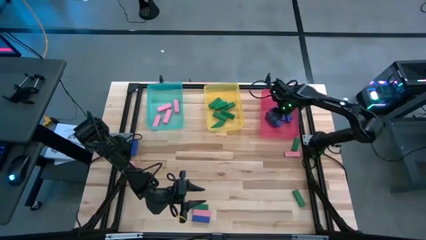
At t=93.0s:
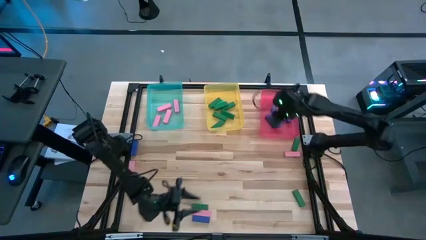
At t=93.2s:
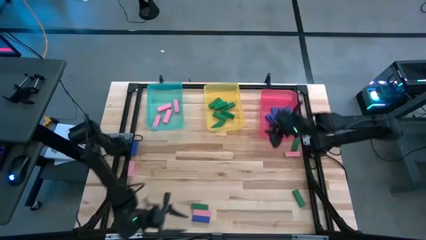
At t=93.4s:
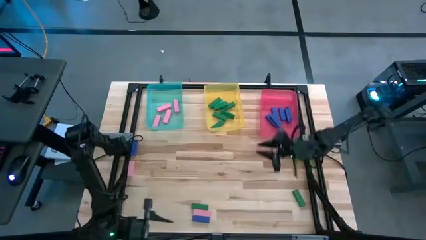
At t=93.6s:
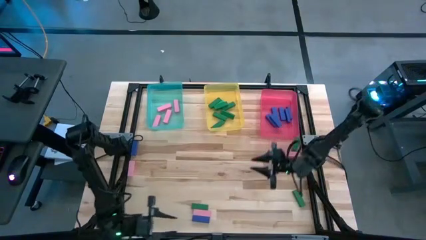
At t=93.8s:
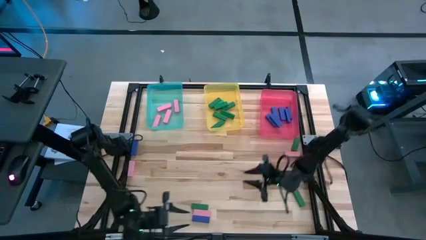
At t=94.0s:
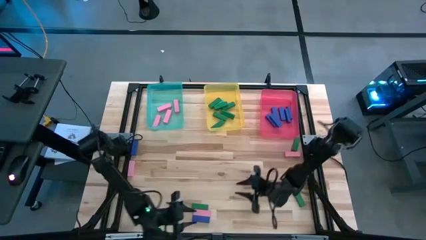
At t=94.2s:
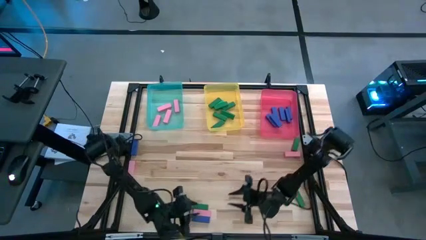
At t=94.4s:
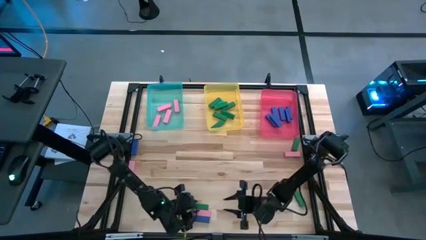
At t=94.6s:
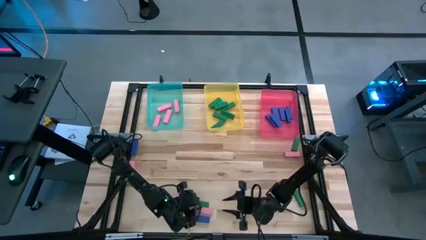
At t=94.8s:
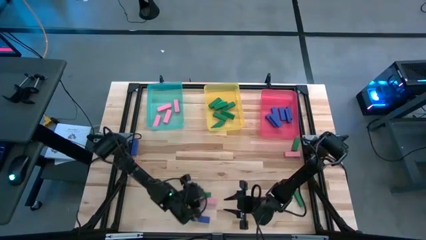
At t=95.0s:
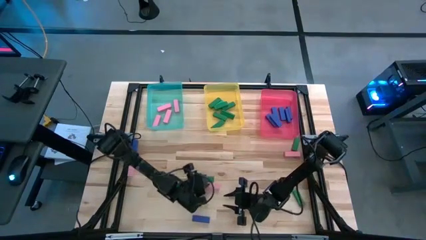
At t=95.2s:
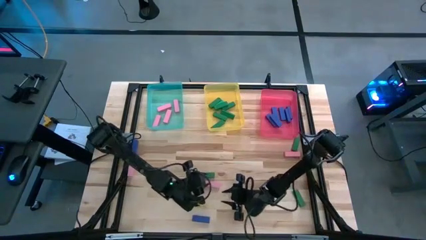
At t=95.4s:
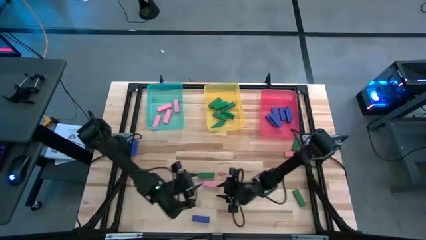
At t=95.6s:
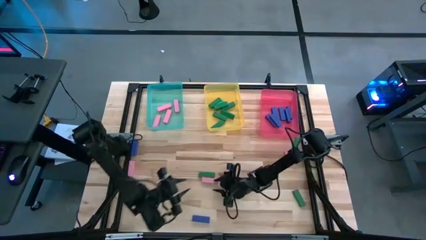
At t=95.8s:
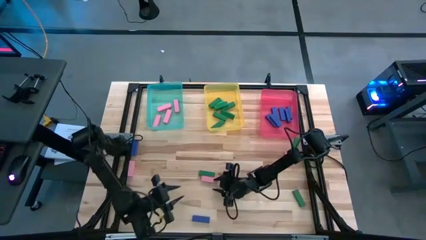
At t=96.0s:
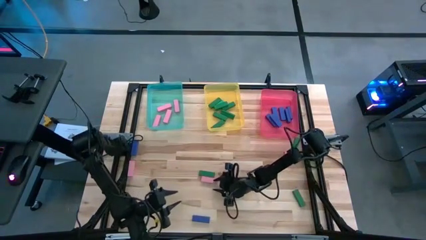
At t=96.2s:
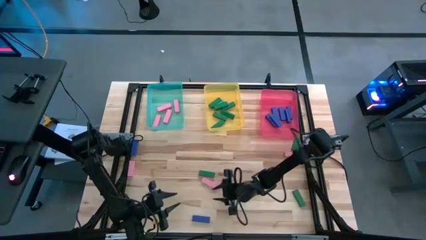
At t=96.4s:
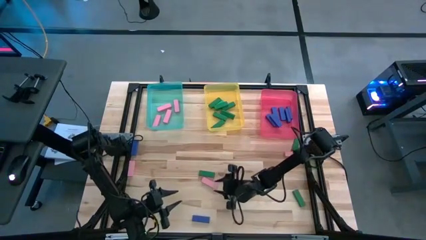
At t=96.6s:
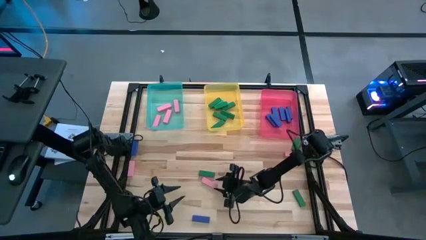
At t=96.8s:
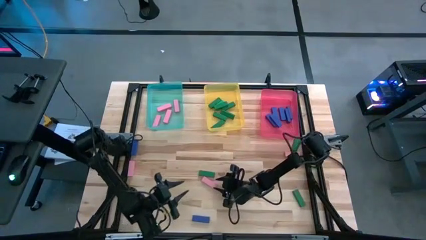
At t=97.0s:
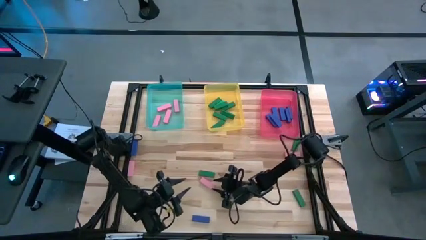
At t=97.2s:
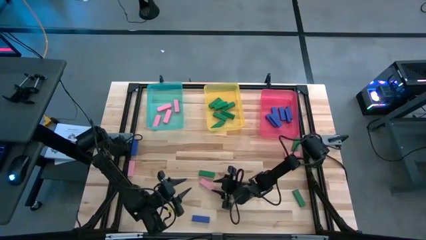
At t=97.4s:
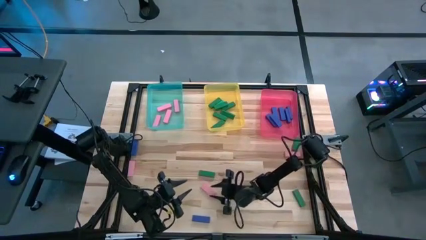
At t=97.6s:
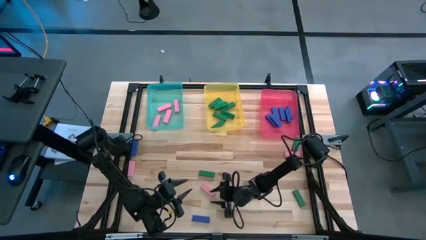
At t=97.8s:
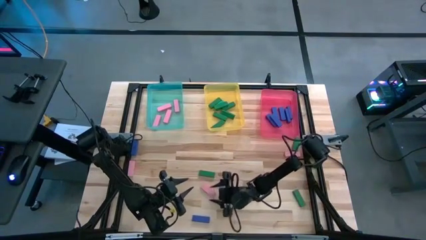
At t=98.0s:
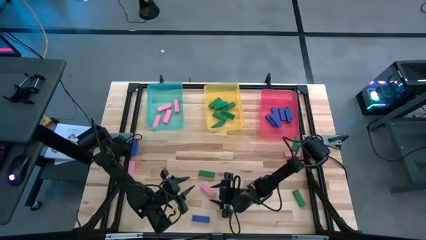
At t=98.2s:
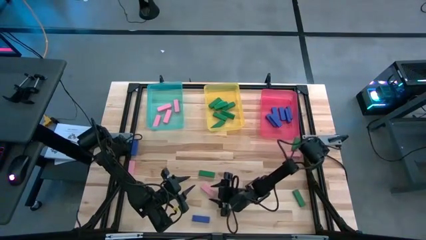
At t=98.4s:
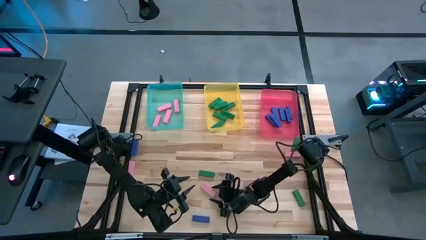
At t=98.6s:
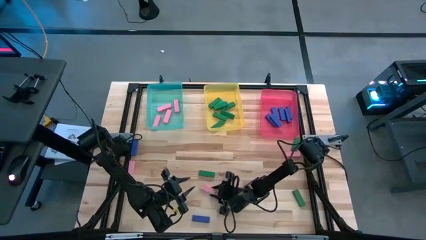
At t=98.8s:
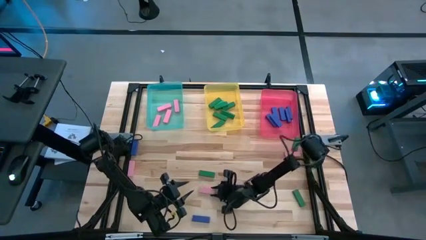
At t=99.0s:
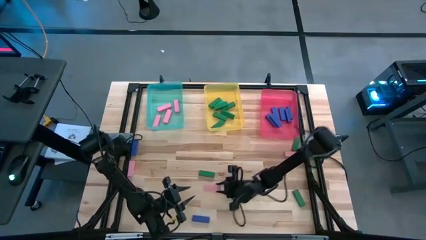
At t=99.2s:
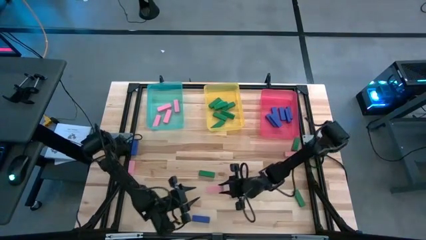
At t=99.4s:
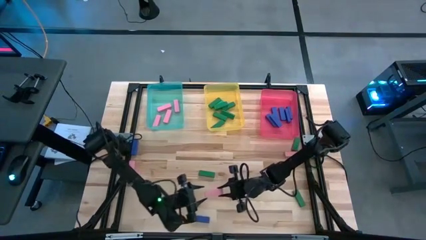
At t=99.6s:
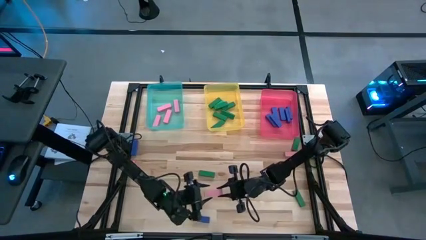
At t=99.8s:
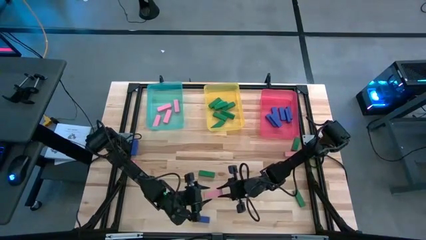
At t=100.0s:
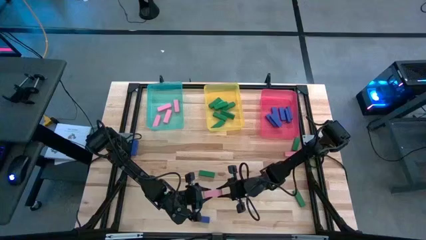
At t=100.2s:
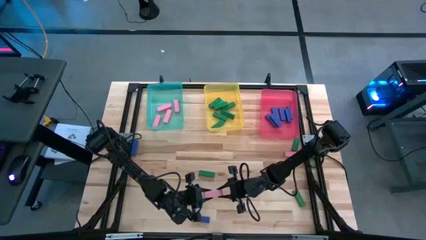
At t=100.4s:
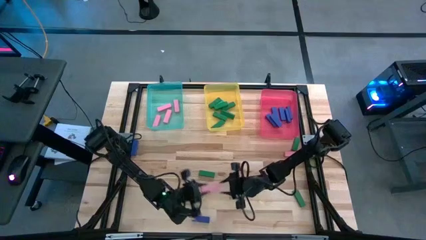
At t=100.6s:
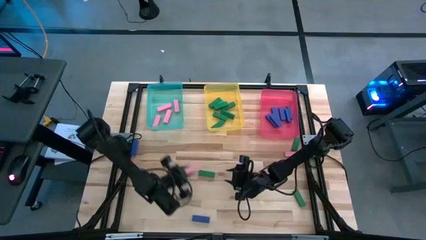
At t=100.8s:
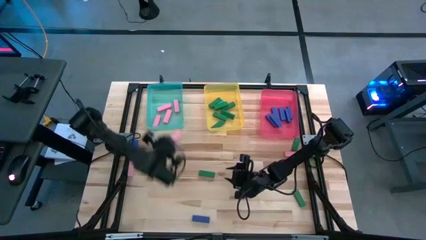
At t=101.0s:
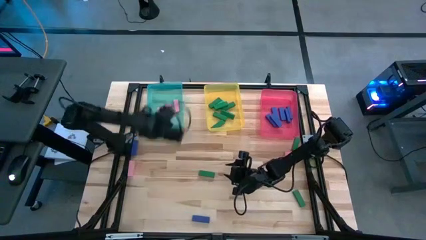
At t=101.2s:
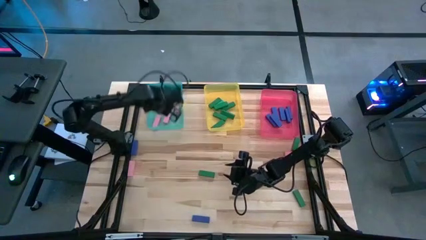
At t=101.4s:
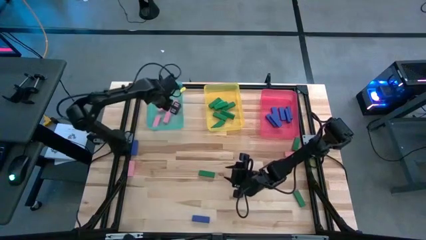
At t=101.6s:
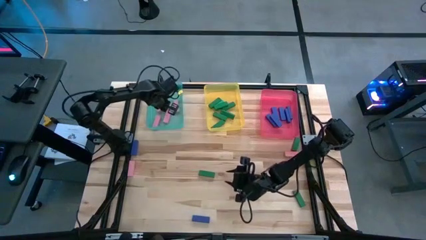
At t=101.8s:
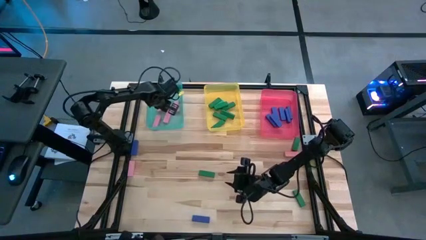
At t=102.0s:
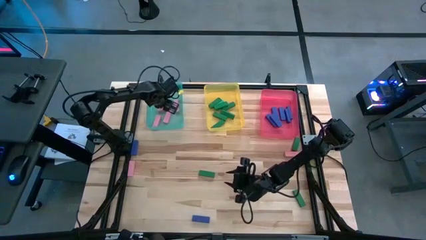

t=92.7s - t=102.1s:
Task: Sort blocks
Put the pink wooden block into the blue bin

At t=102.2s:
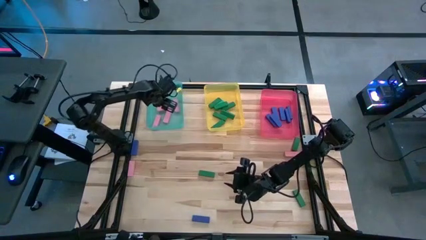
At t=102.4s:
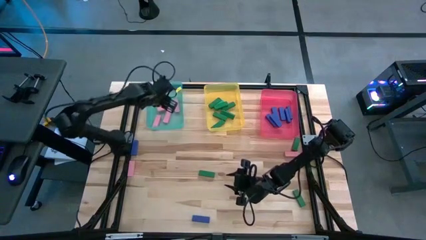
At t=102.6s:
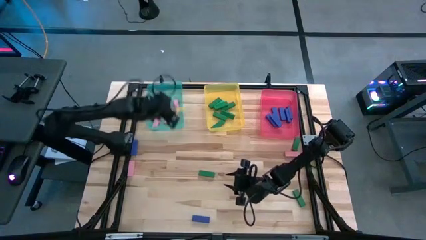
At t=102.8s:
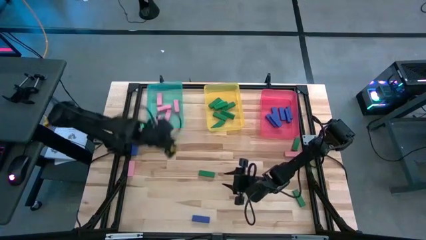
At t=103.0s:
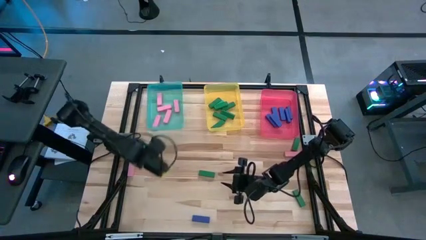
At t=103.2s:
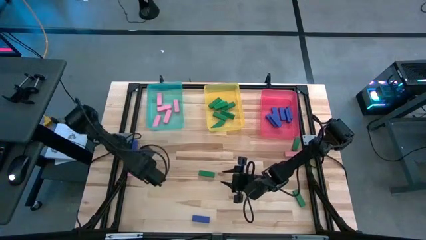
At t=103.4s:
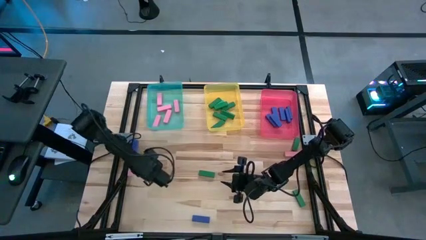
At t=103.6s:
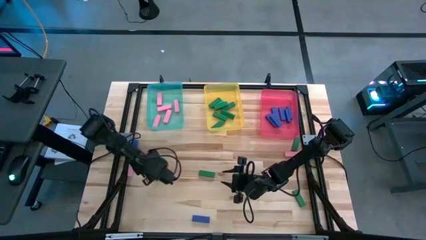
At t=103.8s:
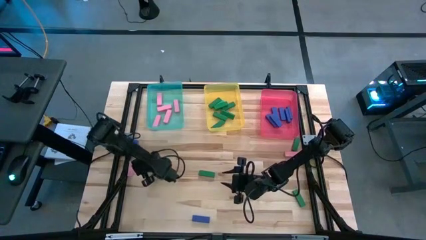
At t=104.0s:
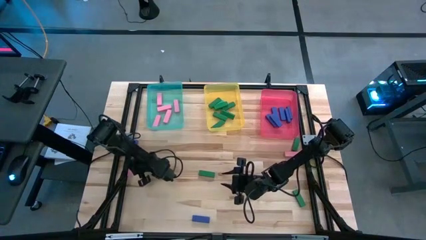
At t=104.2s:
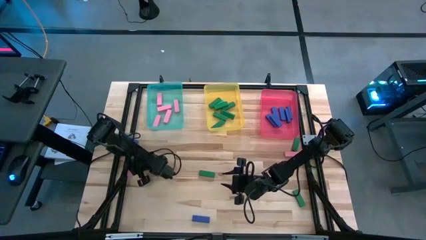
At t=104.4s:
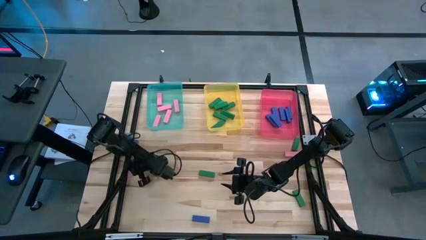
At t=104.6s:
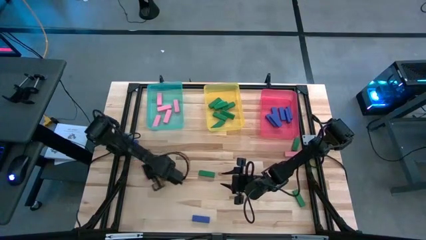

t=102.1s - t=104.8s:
Move the pink wooden block to the center of the table

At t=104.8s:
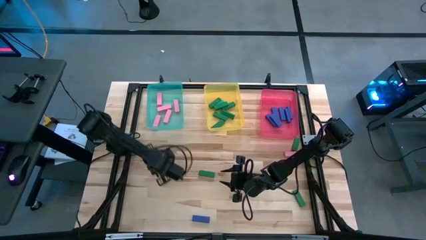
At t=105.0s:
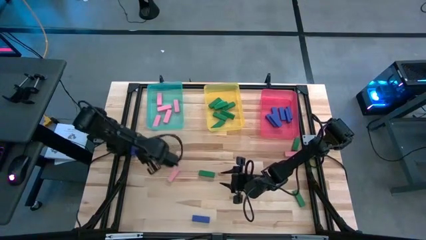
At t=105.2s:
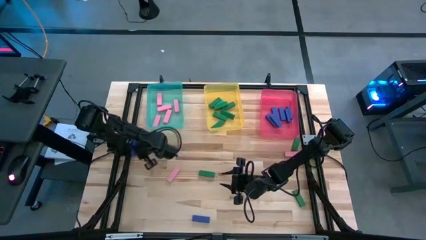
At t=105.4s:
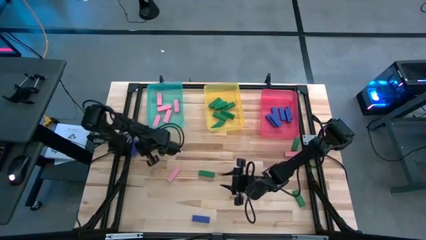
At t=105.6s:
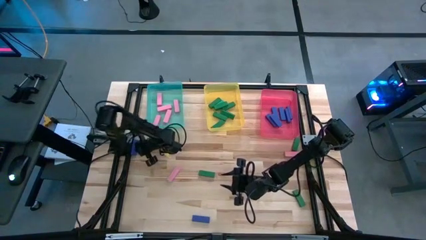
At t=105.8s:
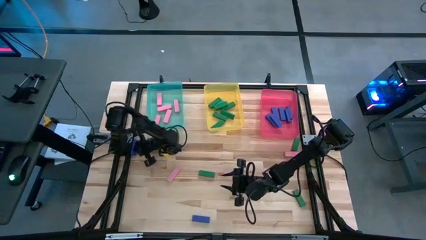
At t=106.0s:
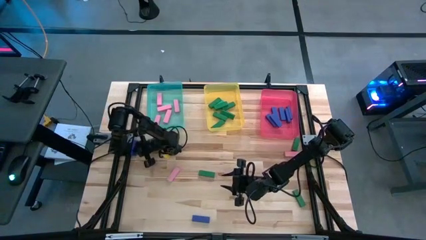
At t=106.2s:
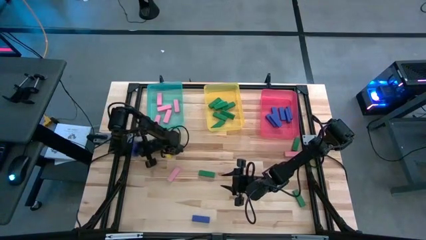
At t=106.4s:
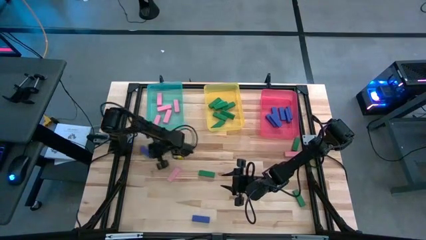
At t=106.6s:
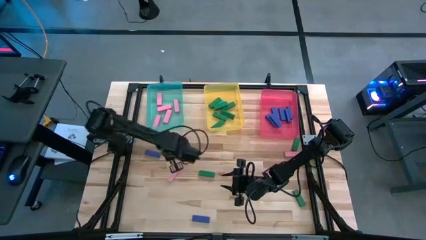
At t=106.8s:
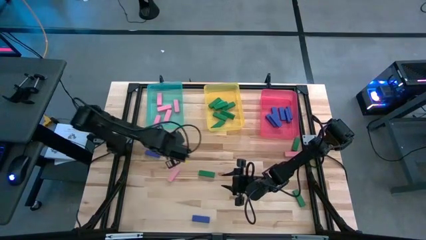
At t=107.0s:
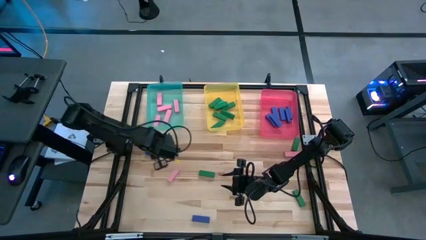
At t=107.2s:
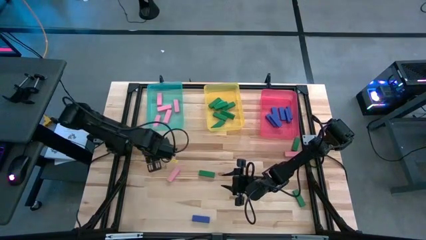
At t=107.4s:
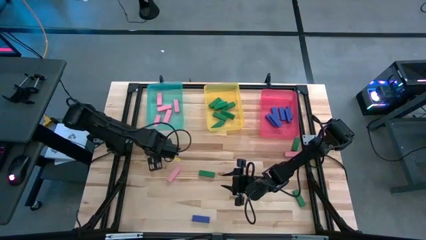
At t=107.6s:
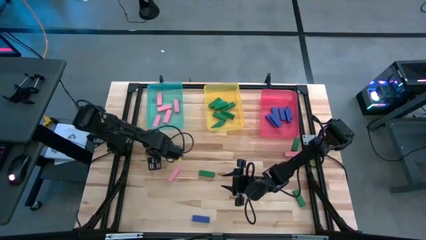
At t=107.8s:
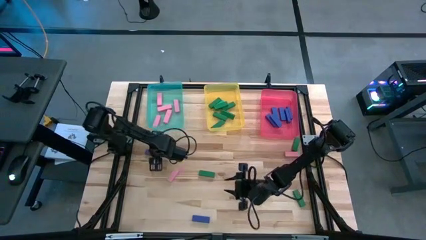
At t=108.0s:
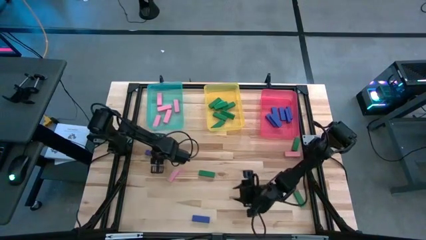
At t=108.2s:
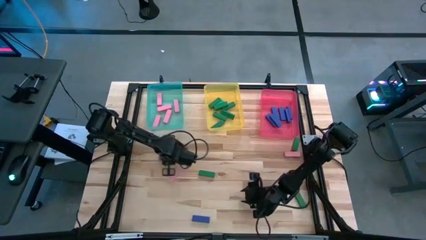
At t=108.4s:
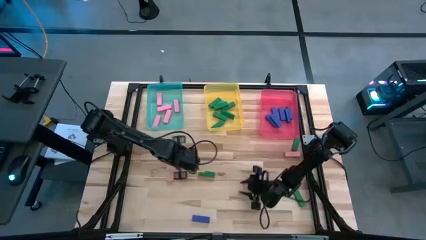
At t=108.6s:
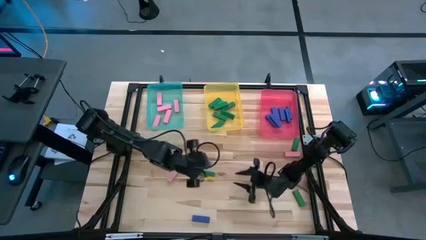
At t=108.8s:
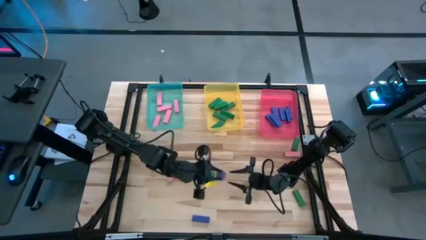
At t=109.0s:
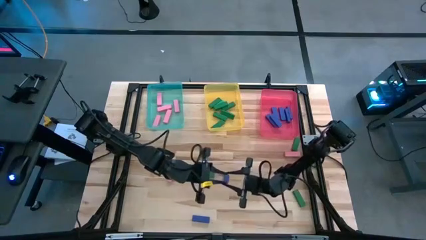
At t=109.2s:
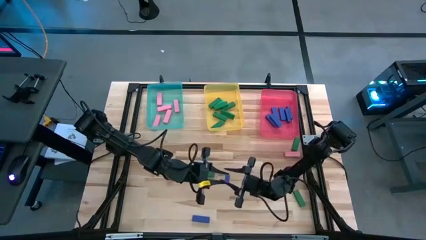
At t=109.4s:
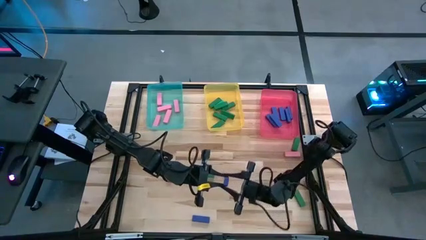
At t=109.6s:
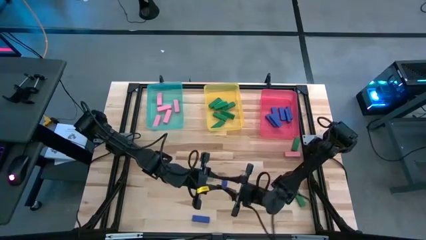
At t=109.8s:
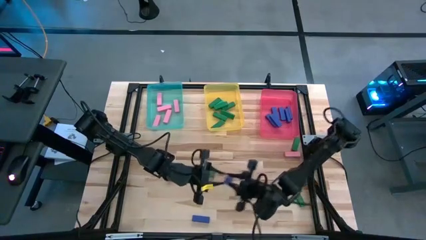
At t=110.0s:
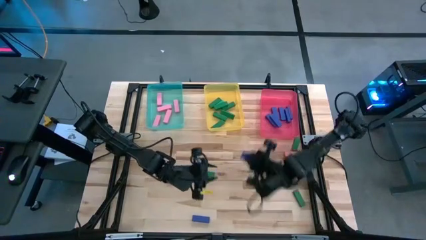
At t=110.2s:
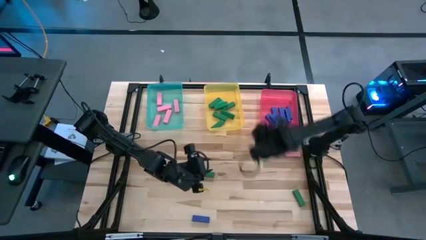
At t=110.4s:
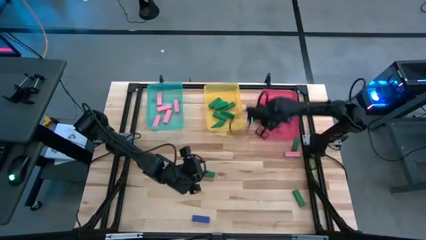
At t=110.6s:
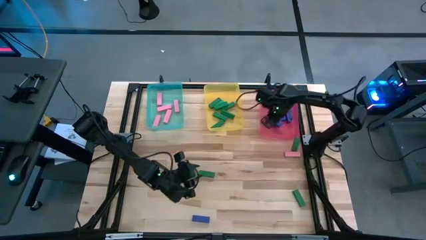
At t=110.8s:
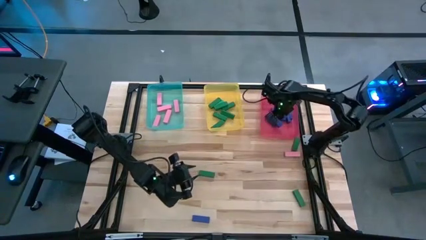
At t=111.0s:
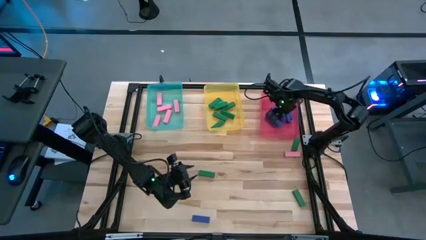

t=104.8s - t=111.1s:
Put the blue wooden block into the red bin
